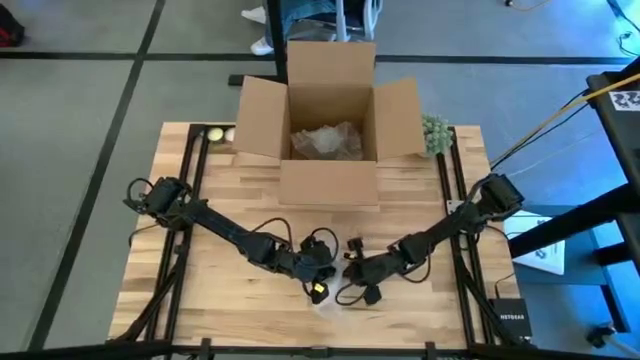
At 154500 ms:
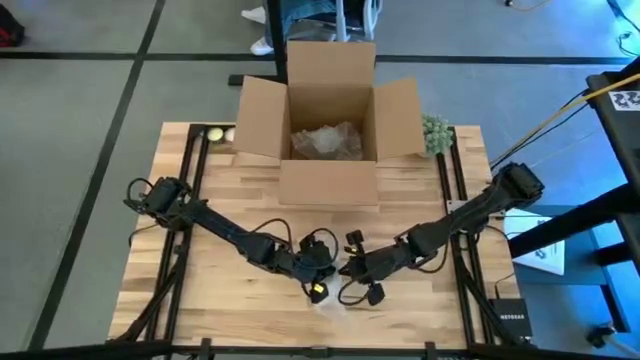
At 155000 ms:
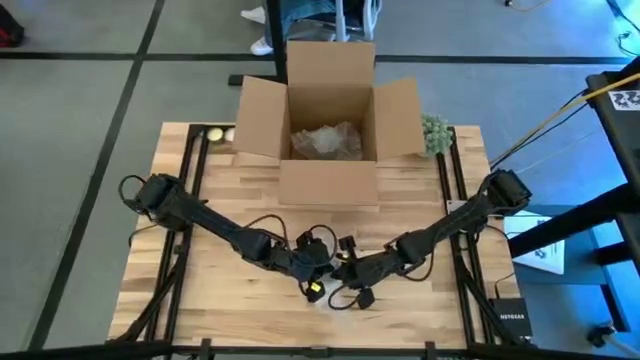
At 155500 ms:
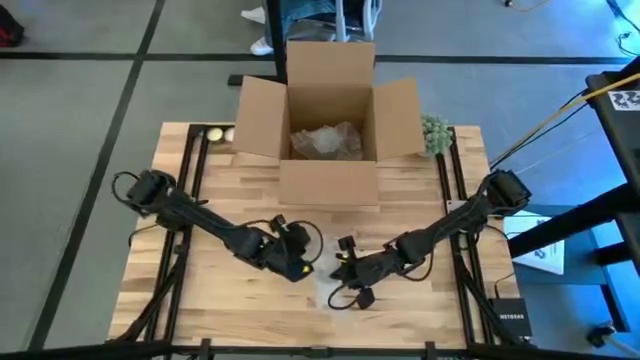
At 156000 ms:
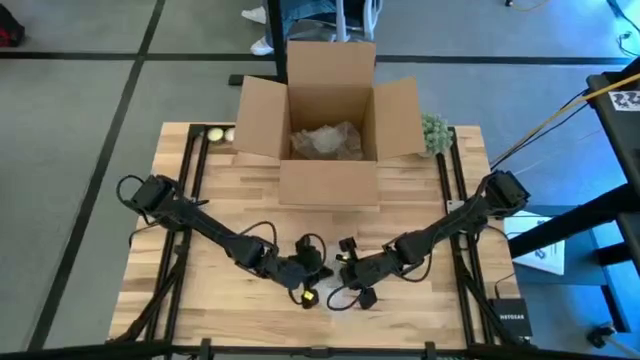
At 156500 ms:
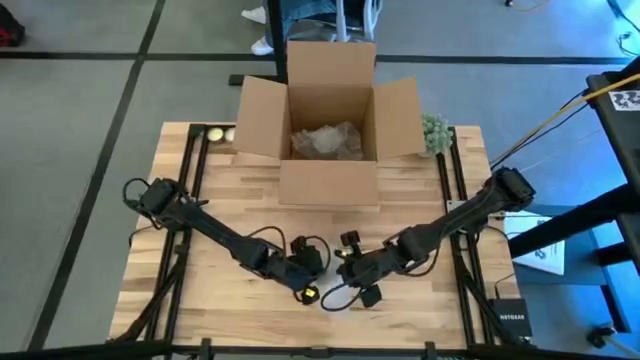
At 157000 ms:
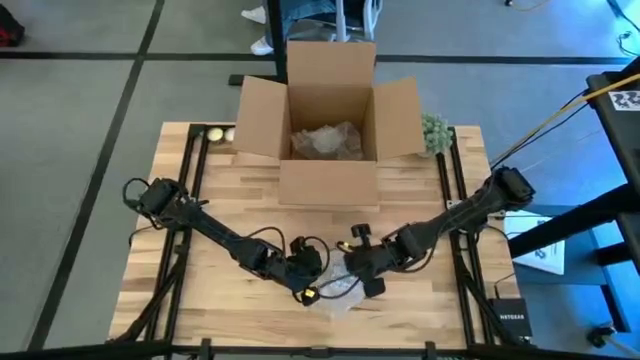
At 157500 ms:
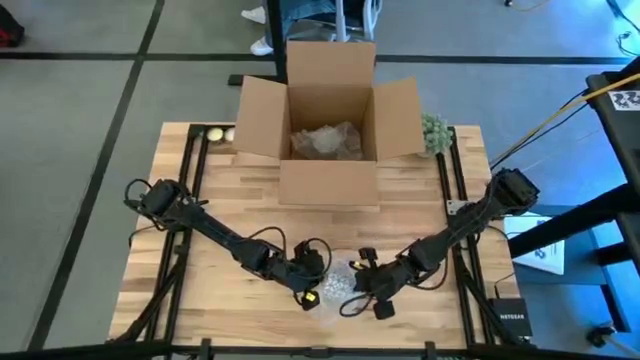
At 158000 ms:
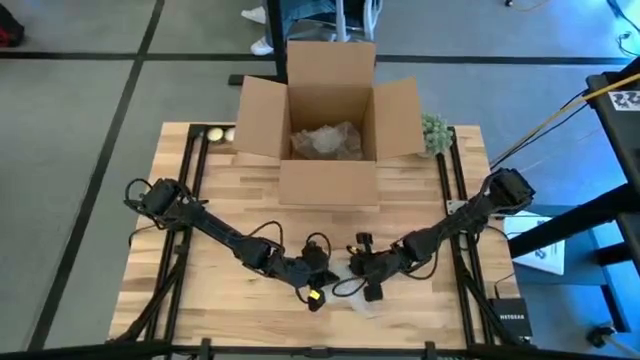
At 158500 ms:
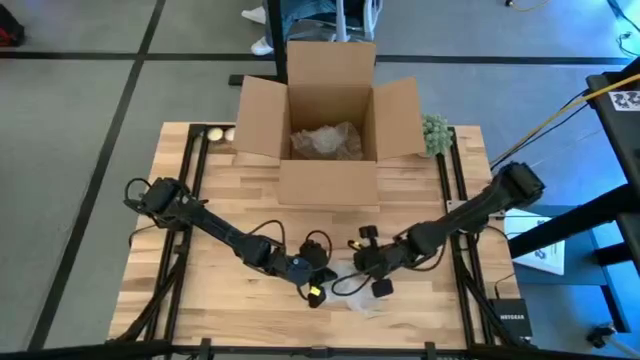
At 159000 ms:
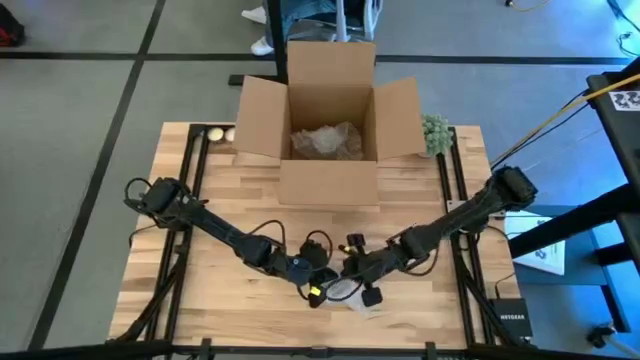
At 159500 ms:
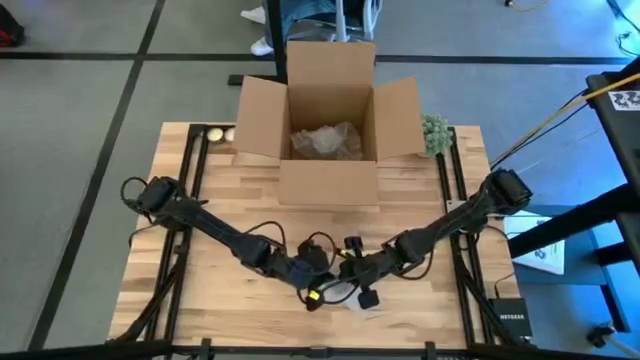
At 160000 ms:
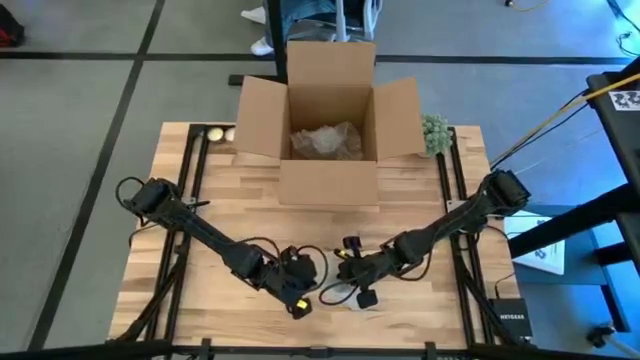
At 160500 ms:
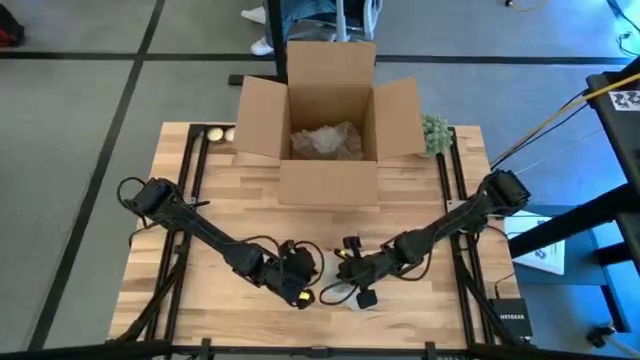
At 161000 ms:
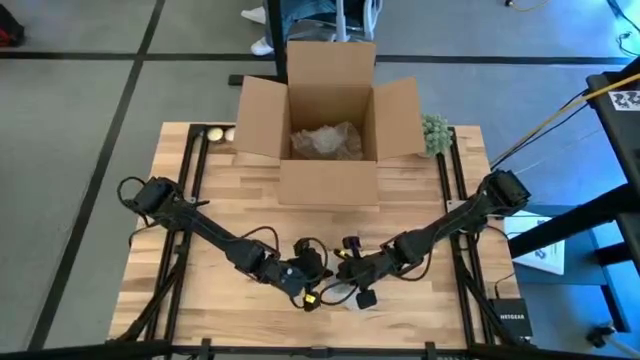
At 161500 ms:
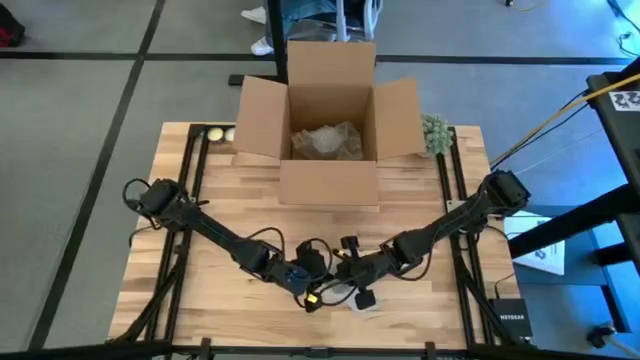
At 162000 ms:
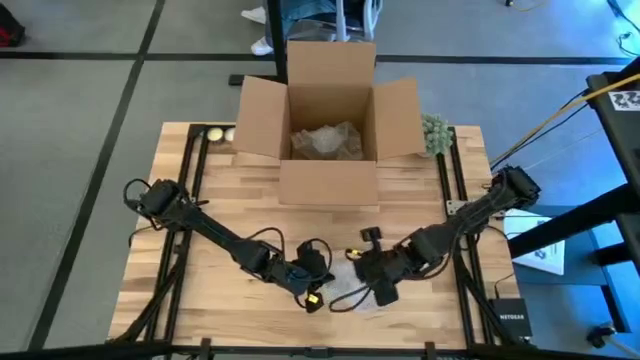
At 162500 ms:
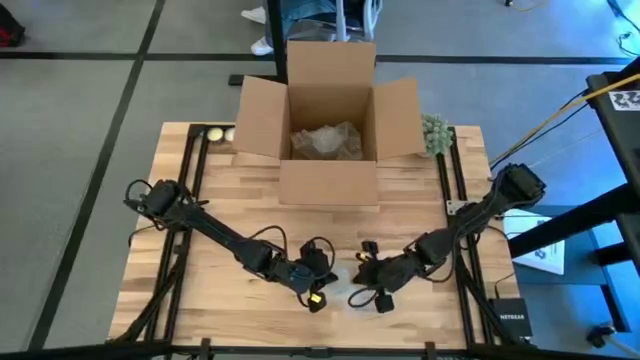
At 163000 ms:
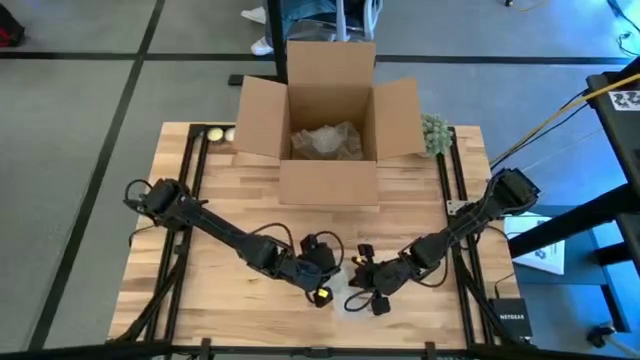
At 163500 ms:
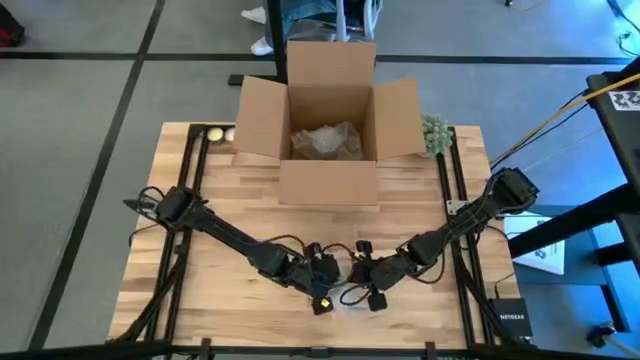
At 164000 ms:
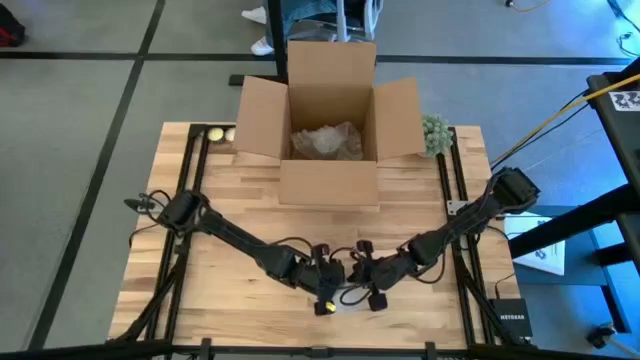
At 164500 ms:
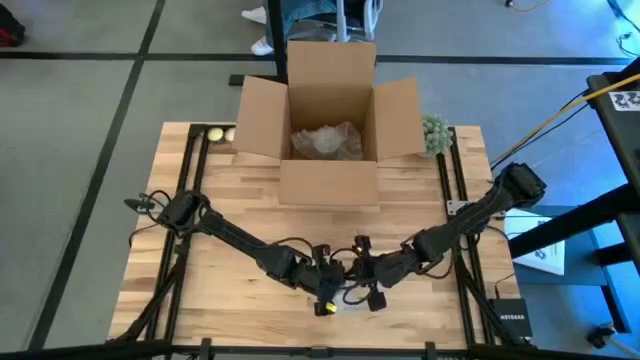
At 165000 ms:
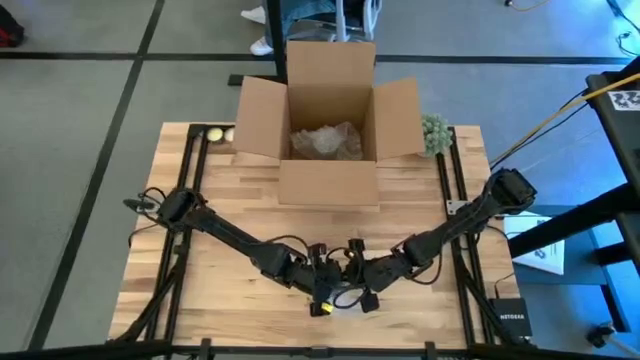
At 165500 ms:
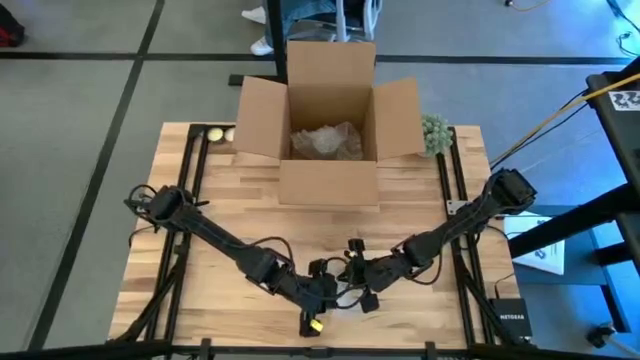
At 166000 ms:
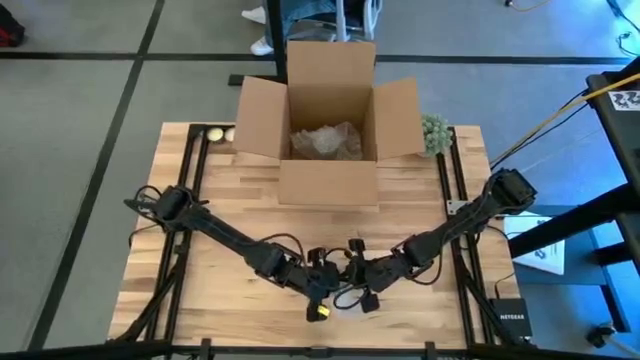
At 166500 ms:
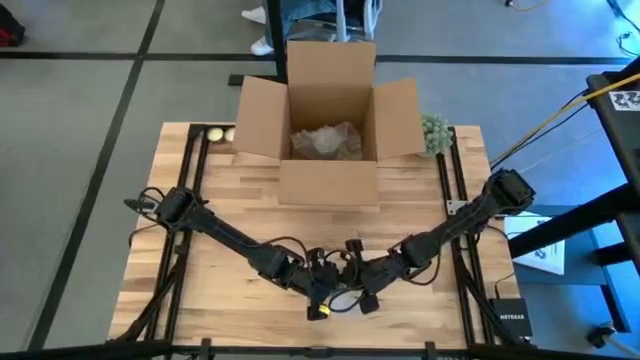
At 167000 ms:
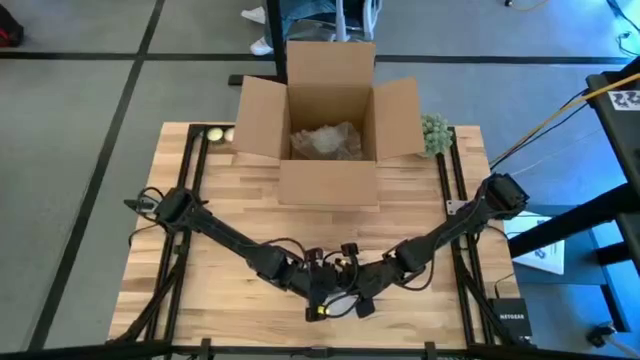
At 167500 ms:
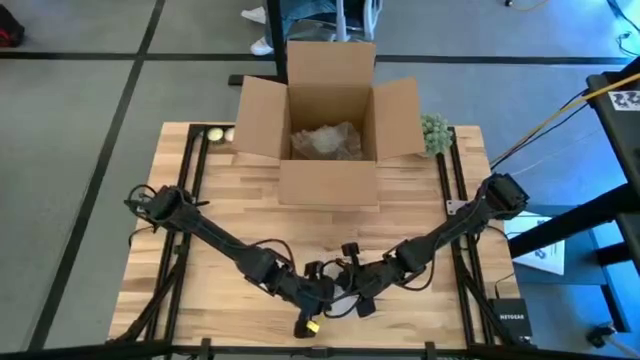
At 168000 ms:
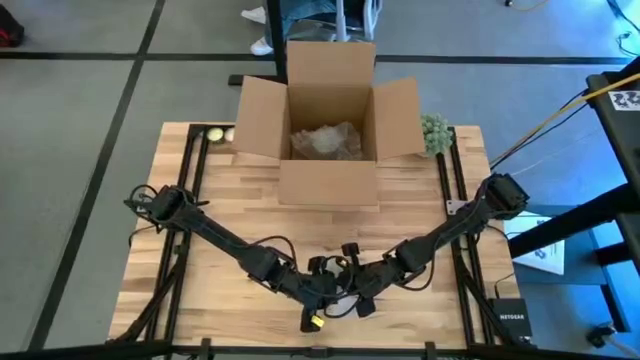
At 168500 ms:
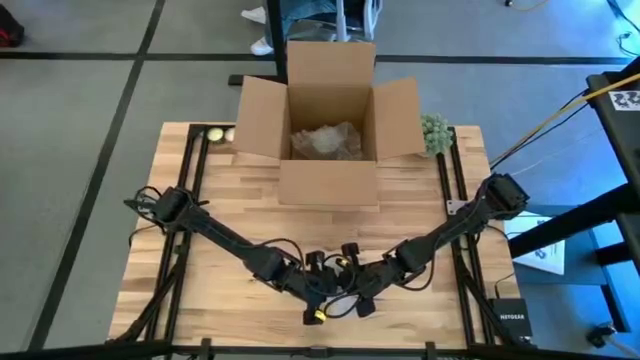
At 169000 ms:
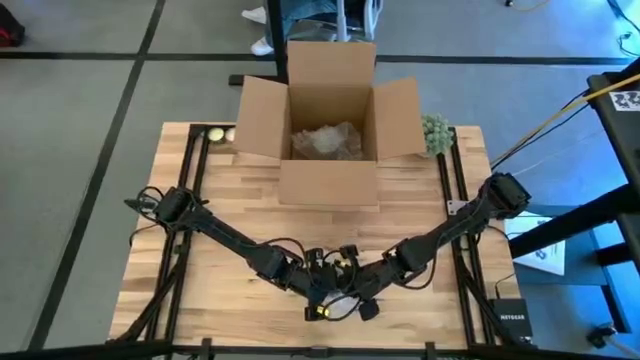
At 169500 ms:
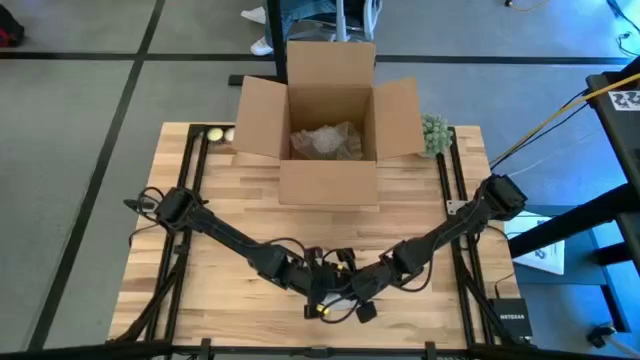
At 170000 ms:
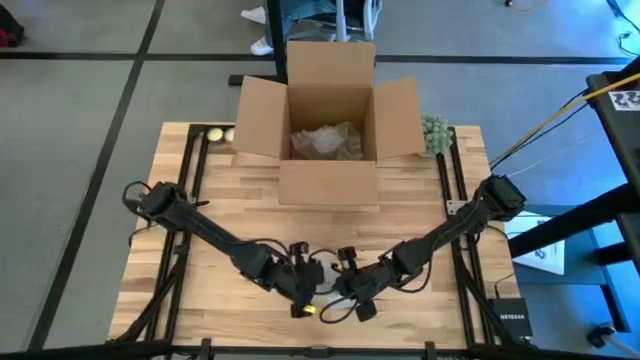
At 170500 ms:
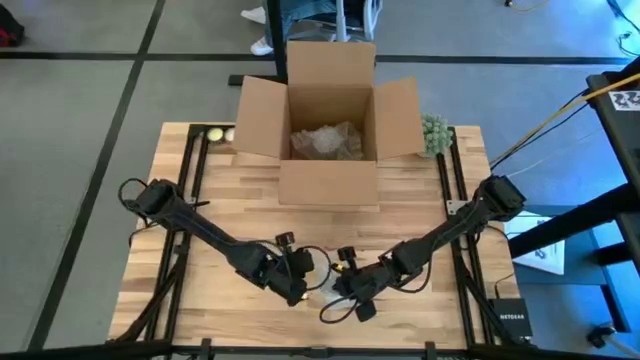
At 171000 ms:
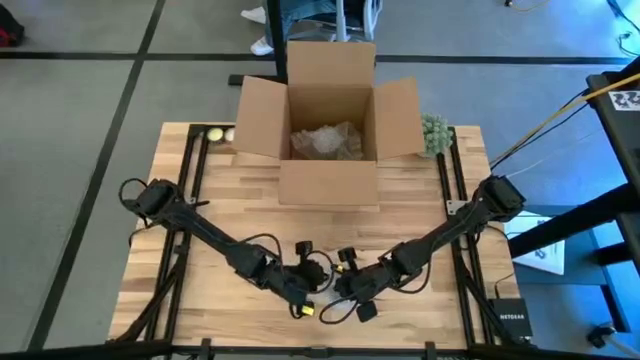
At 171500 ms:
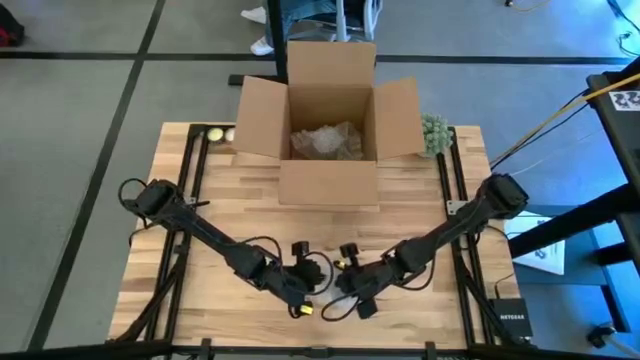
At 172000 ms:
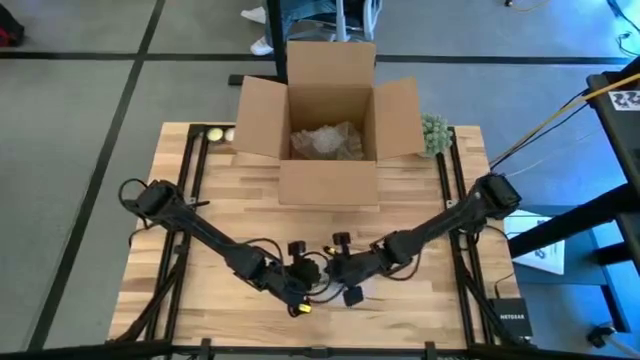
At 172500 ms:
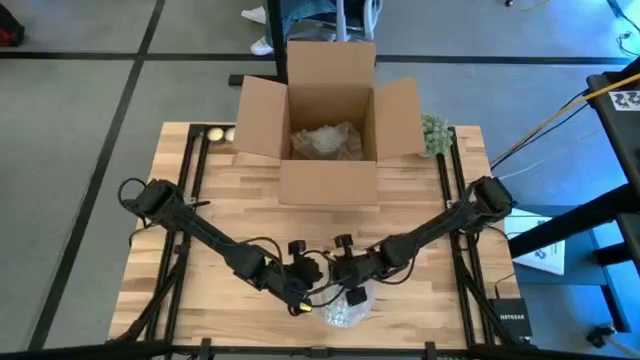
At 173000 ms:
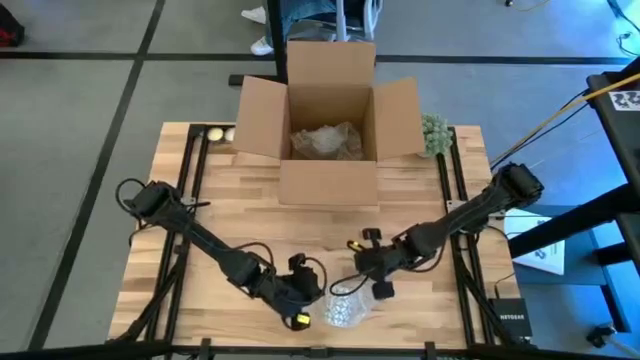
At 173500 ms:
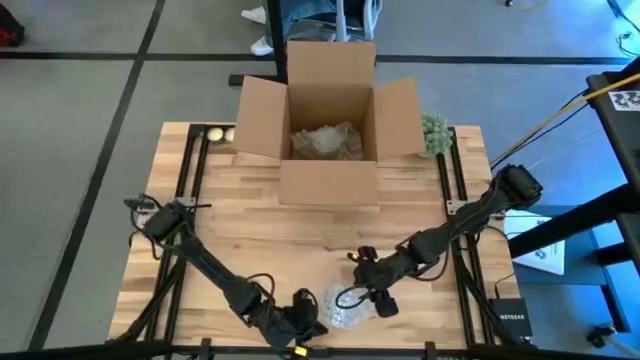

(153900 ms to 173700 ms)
Task: wrap mug
Wrap the mug with the bubble wrap
